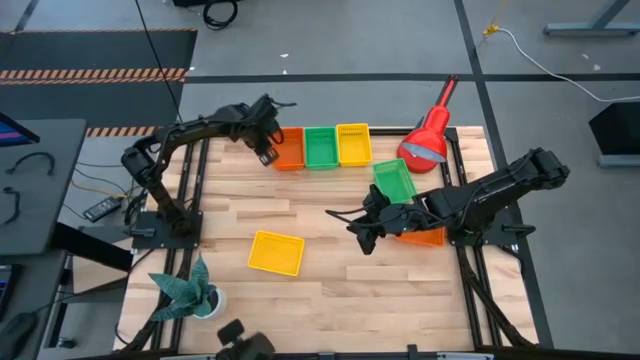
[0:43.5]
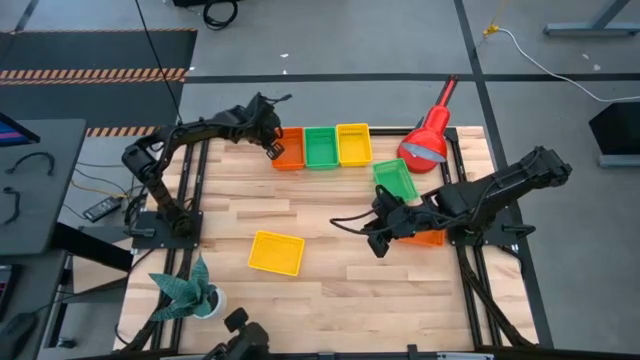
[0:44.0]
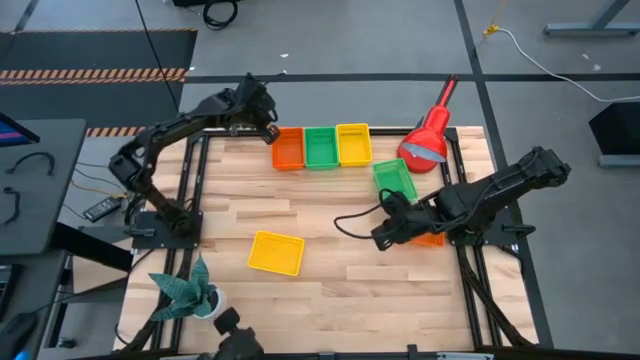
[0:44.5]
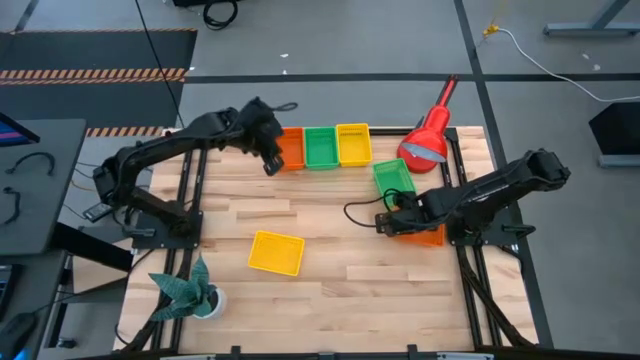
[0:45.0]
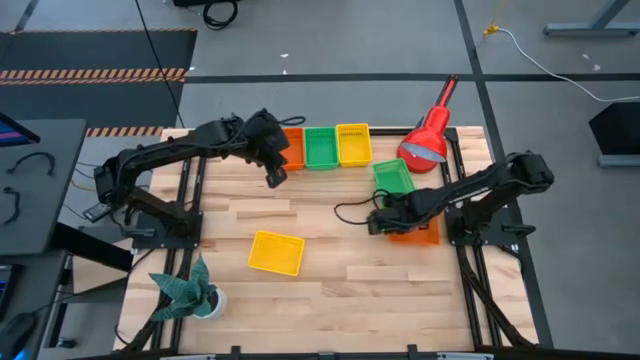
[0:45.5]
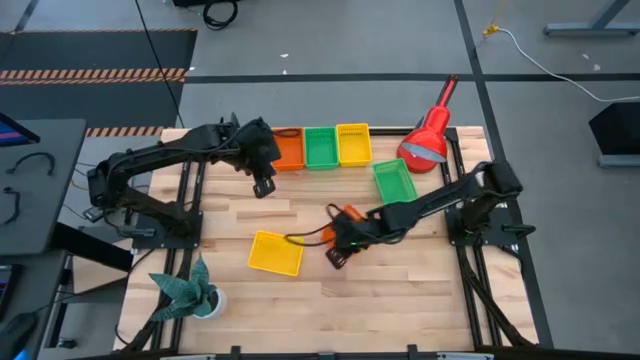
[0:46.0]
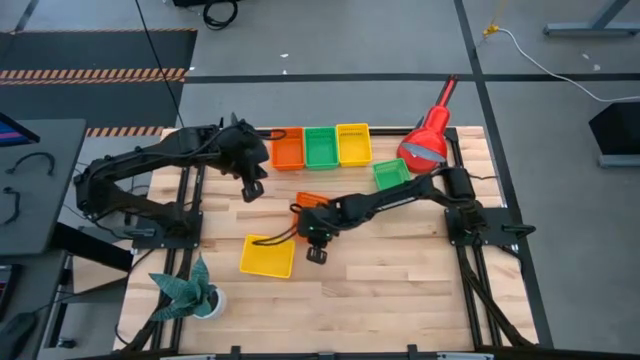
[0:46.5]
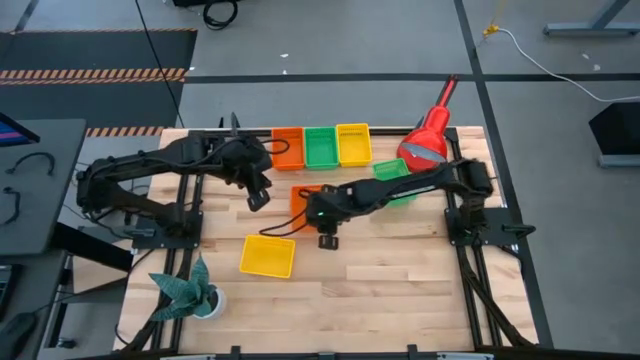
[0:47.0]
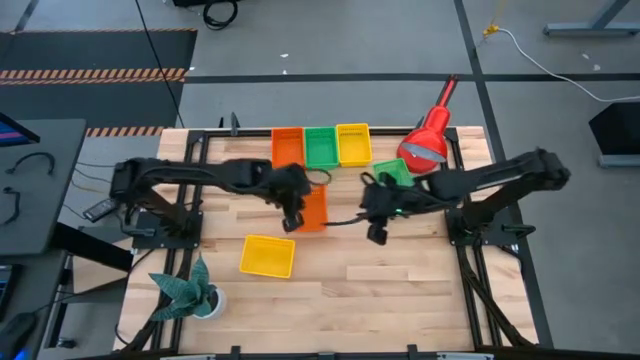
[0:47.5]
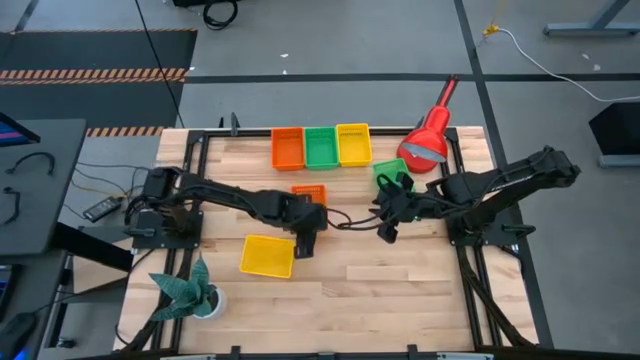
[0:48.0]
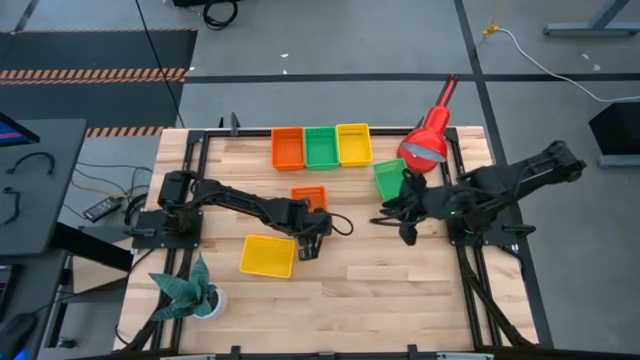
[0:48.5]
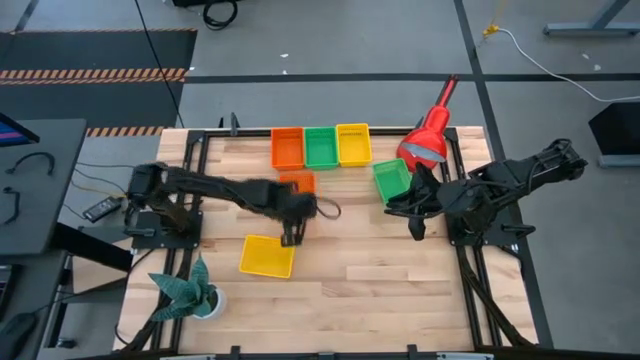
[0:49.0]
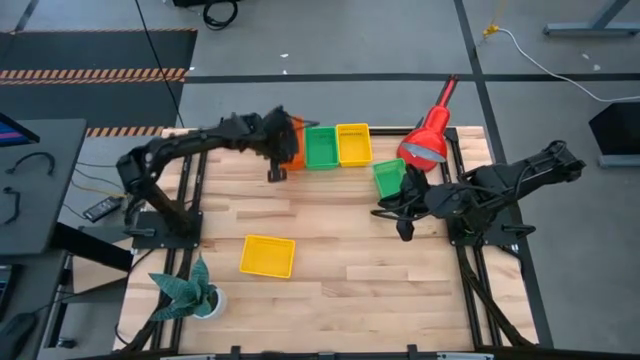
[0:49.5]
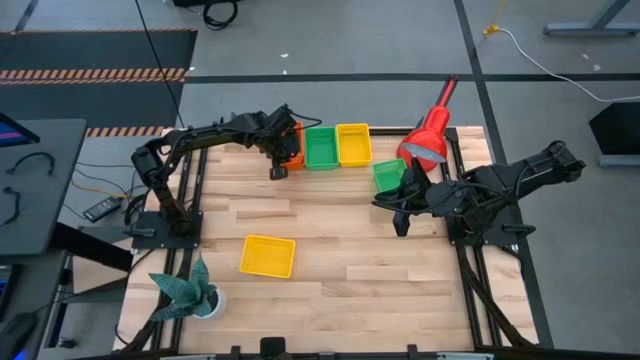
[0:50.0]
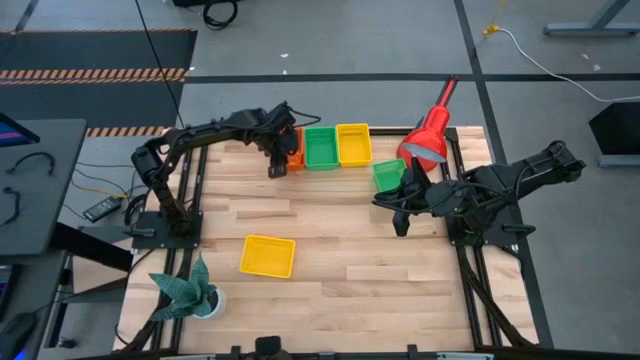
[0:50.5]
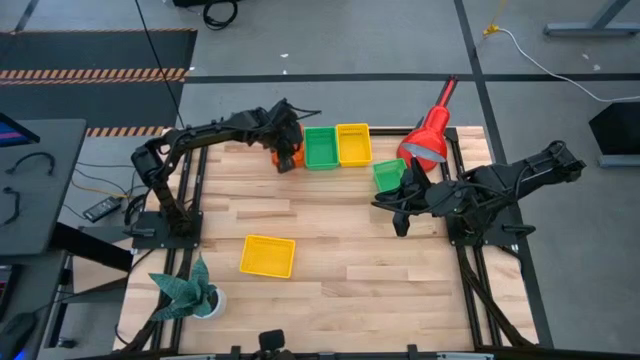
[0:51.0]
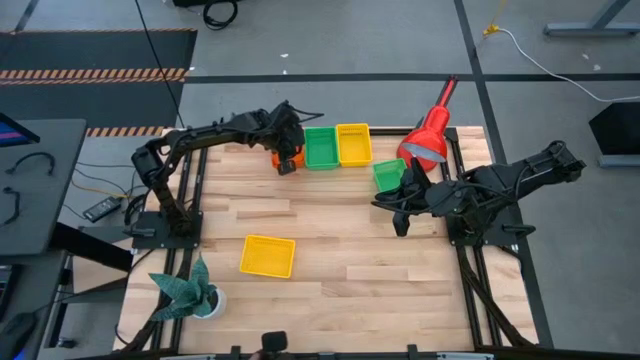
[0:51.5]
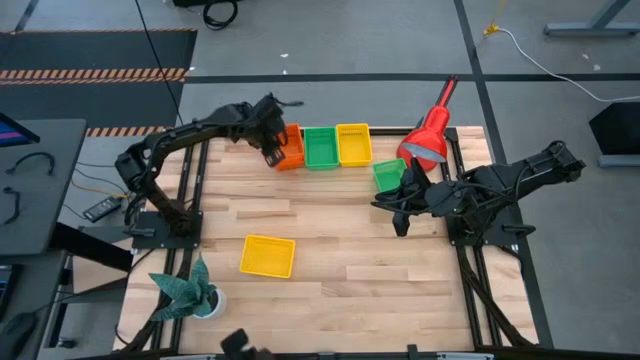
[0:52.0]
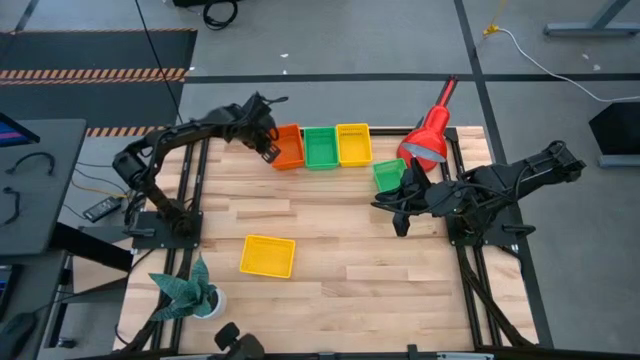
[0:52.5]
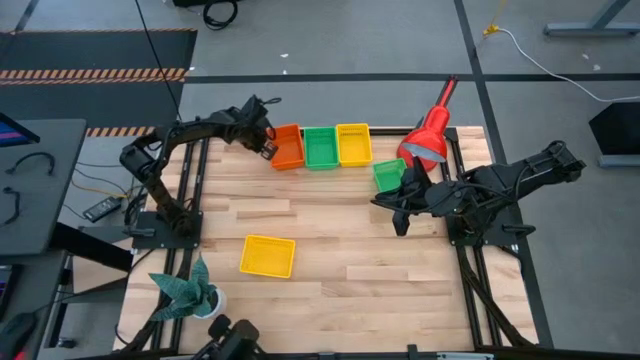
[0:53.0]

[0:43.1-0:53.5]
Stack the orange bin on top of the orange bins

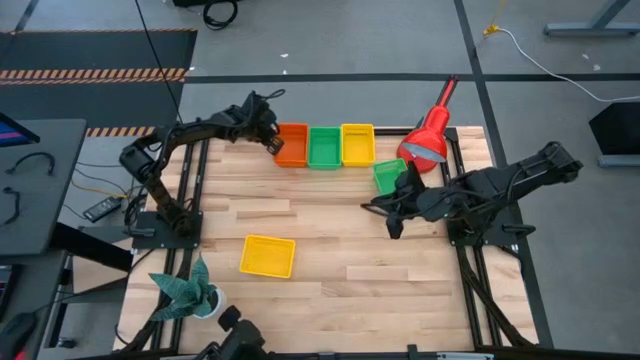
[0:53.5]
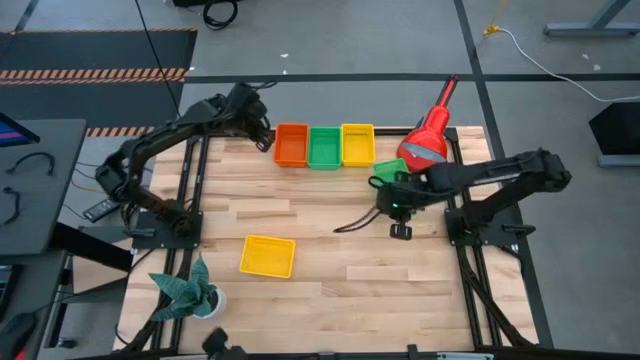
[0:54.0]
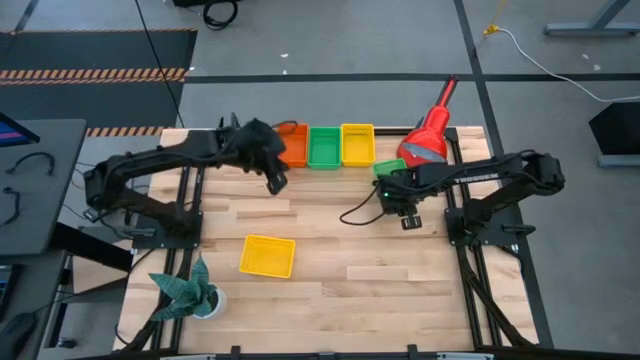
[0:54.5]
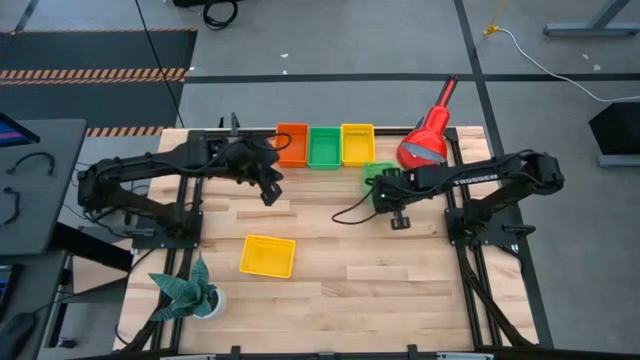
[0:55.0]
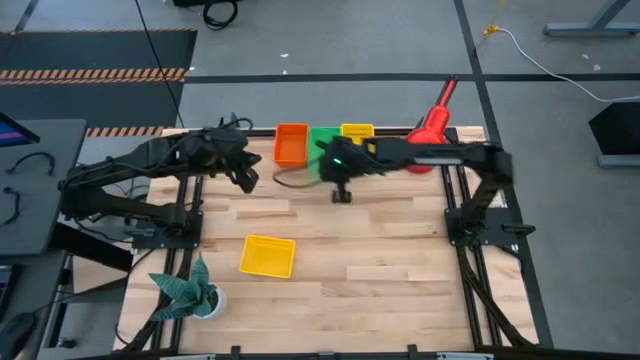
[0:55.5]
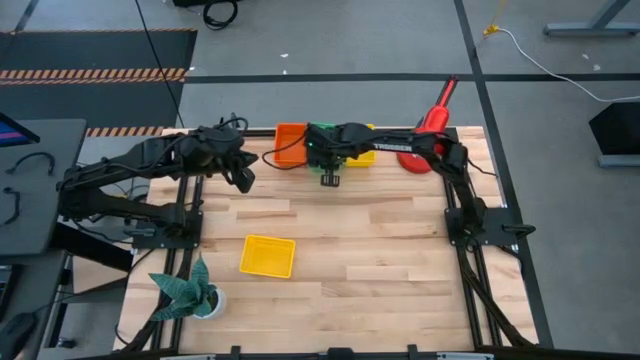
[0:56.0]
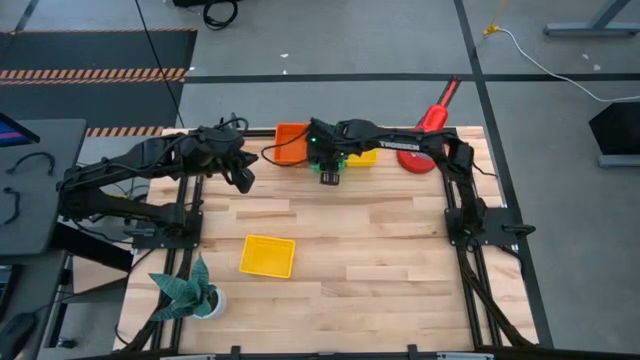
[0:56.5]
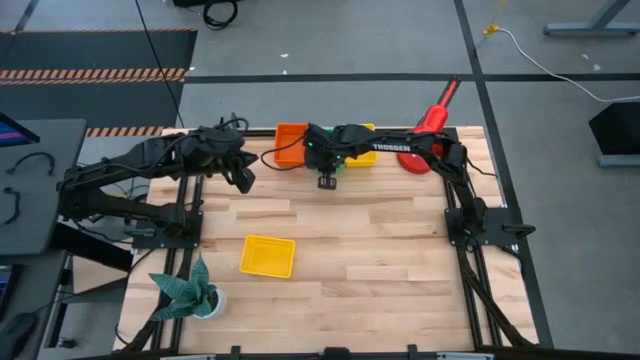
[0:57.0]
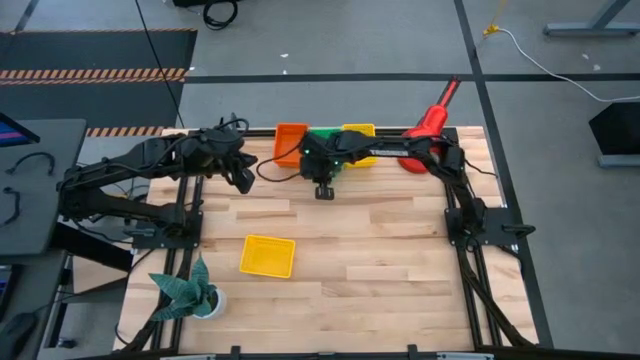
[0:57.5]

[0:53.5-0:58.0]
Stack the green bin on top of the green bins

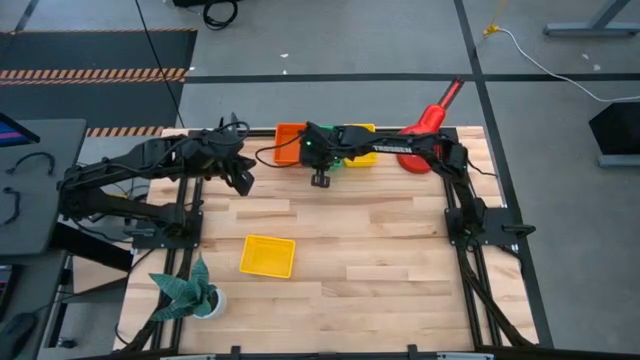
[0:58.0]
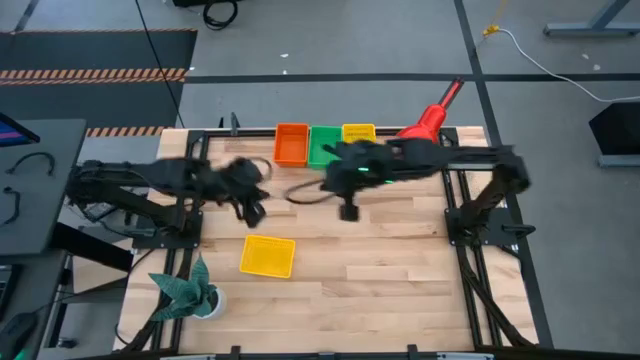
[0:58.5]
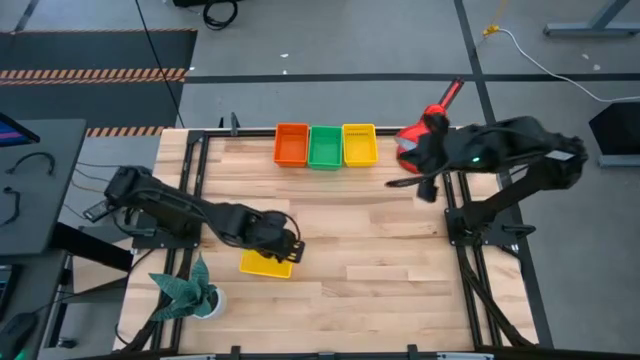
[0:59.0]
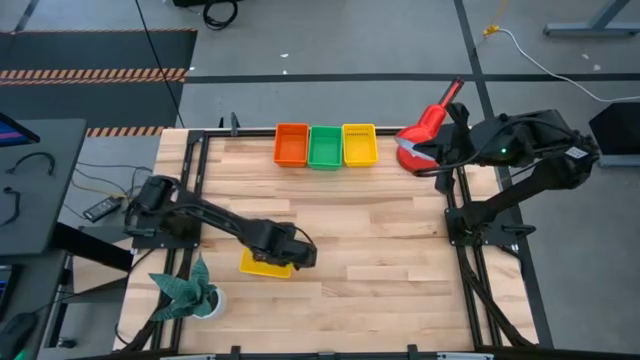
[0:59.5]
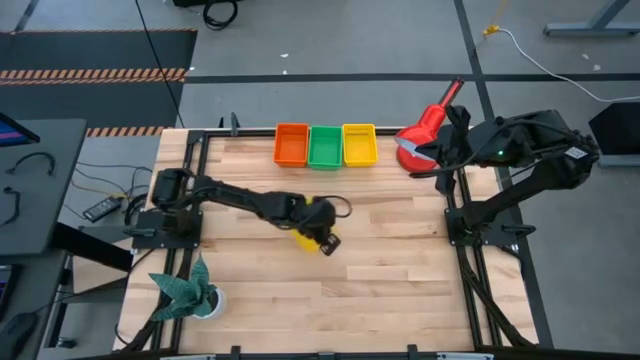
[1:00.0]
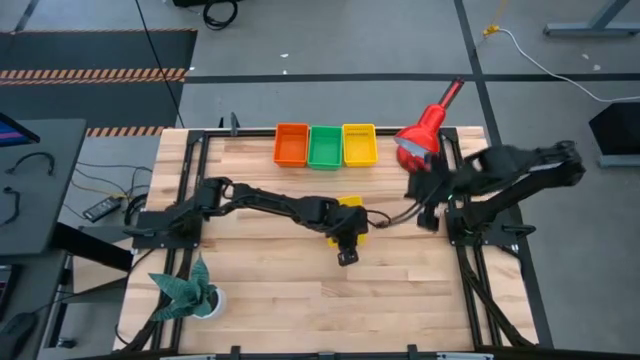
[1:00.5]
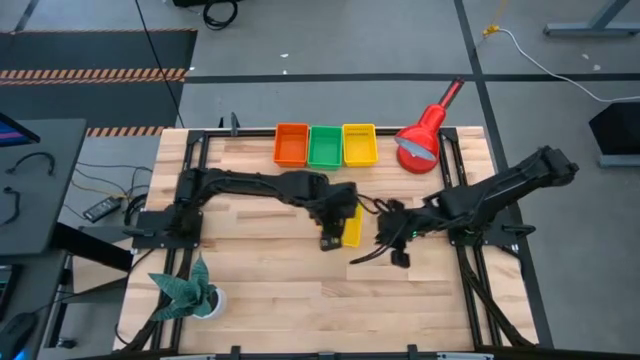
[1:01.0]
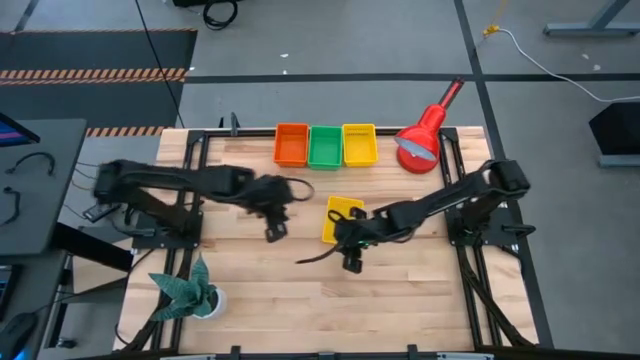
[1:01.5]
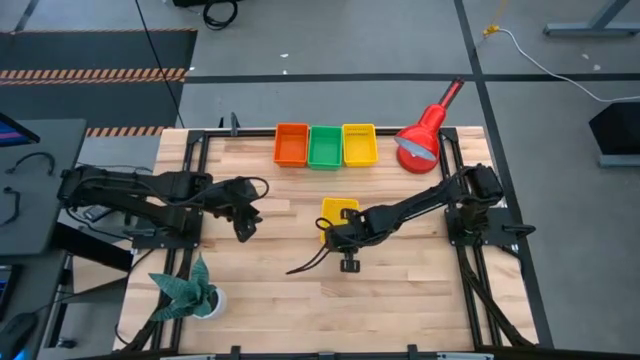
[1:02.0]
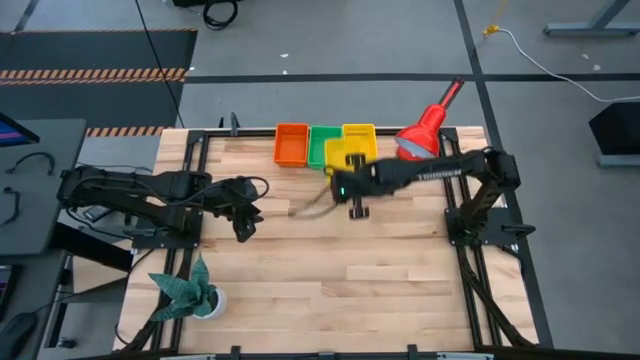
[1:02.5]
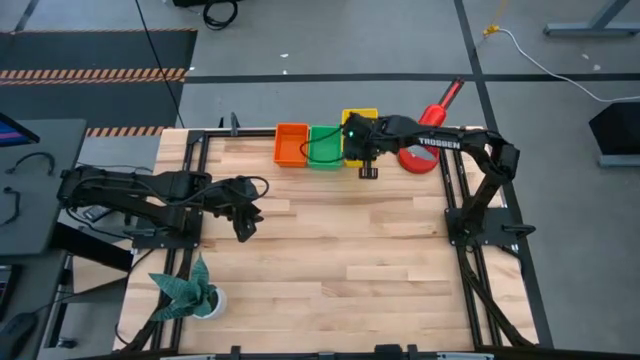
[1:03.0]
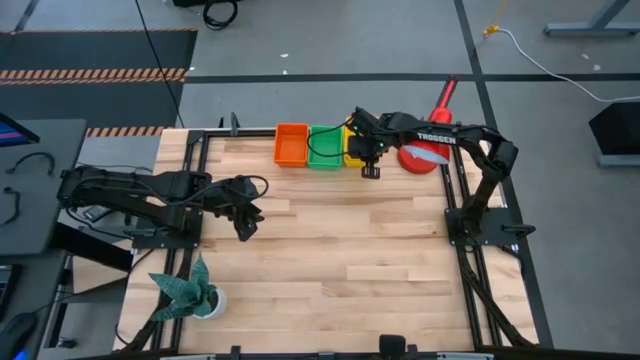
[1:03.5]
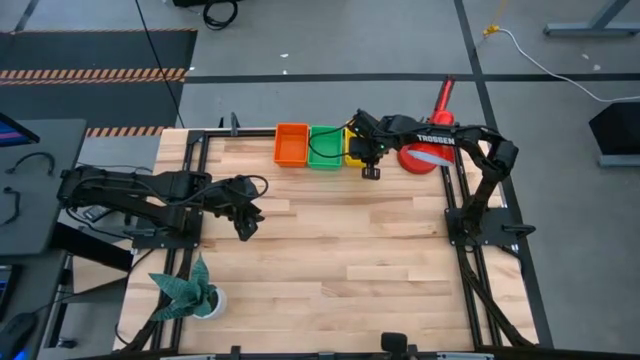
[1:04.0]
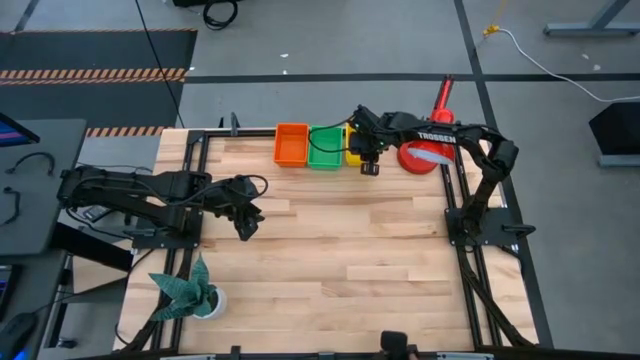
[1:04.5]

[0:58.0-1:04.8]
Stack the yellow bin on top of the yellow bins
